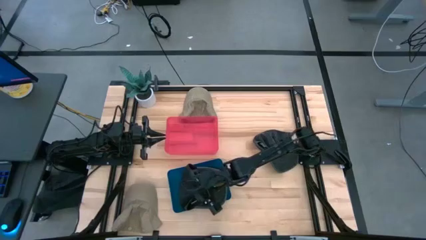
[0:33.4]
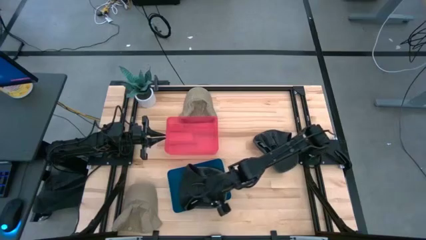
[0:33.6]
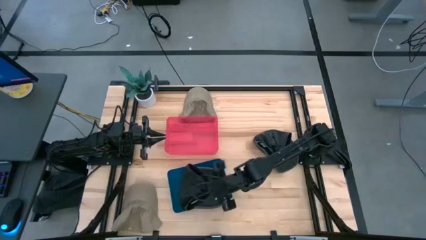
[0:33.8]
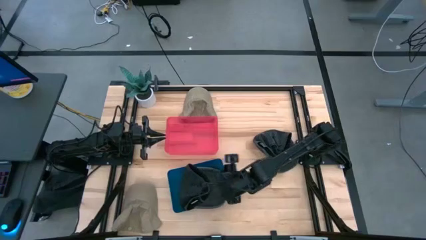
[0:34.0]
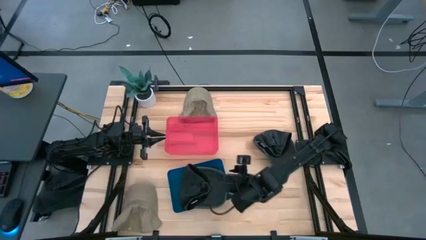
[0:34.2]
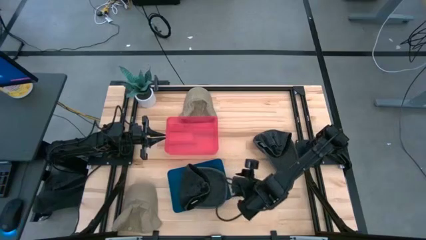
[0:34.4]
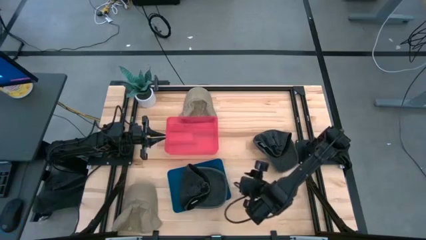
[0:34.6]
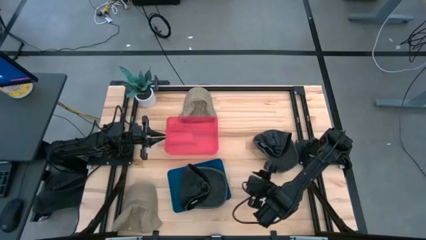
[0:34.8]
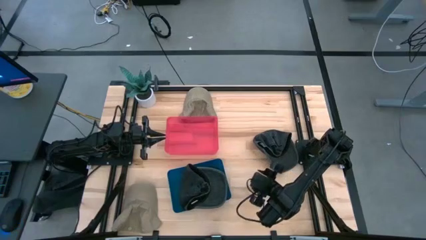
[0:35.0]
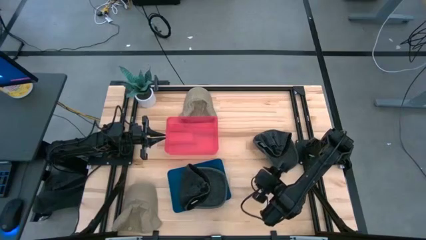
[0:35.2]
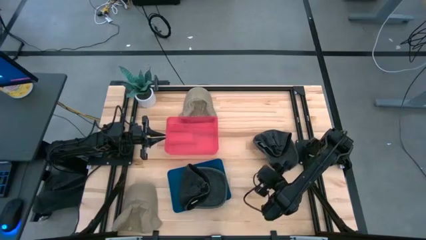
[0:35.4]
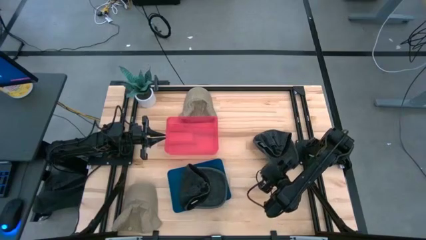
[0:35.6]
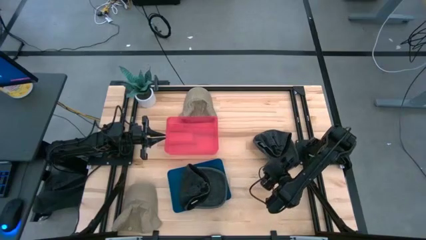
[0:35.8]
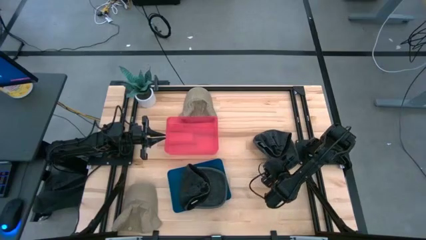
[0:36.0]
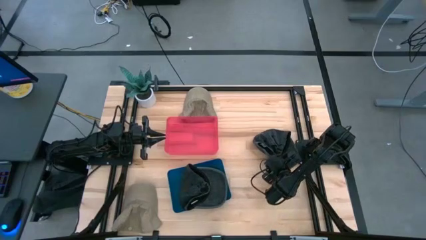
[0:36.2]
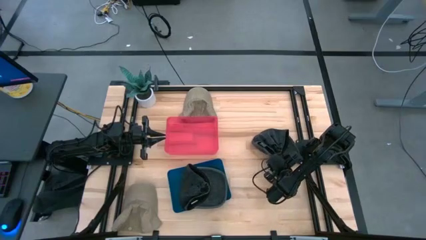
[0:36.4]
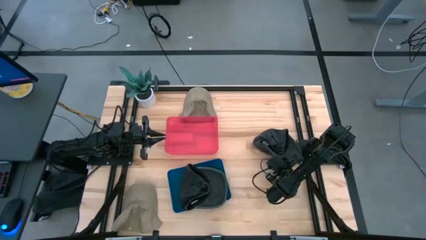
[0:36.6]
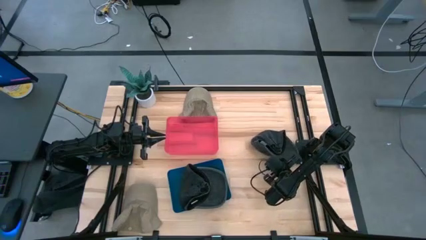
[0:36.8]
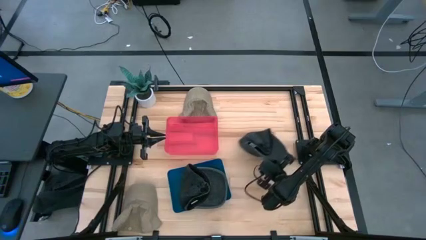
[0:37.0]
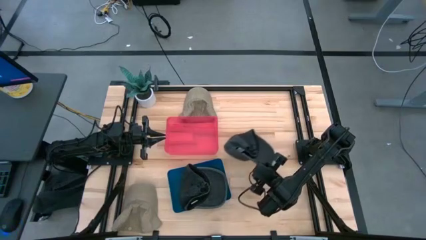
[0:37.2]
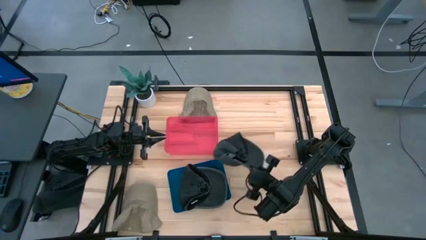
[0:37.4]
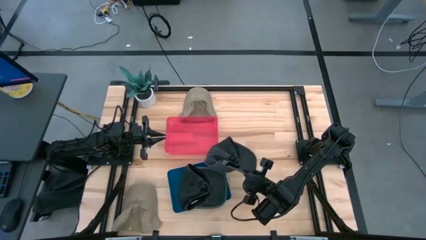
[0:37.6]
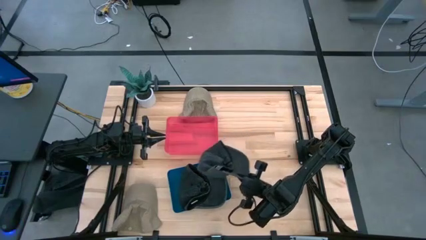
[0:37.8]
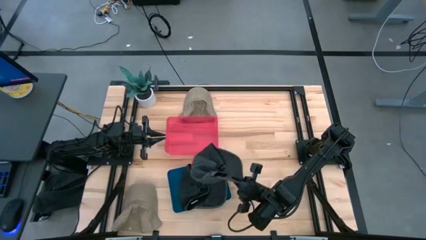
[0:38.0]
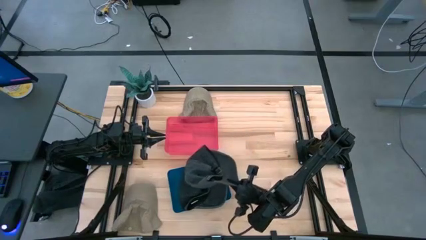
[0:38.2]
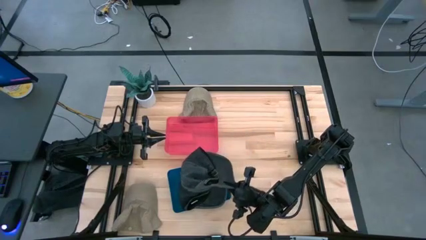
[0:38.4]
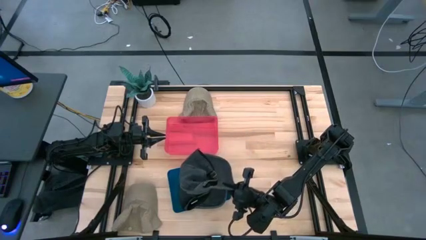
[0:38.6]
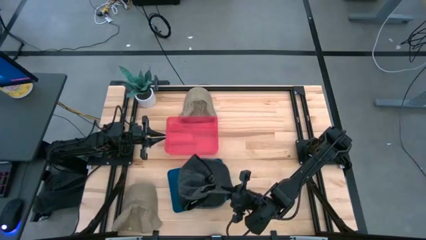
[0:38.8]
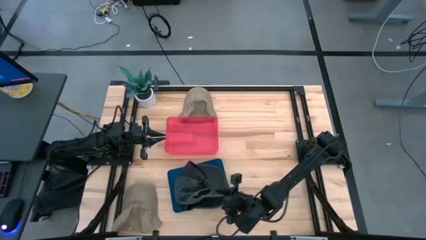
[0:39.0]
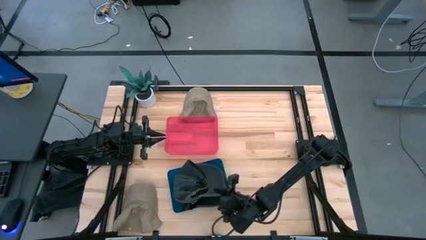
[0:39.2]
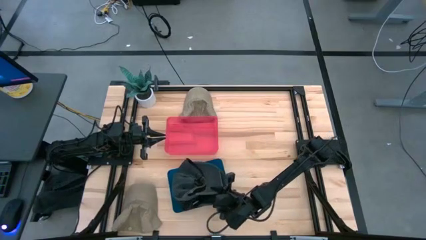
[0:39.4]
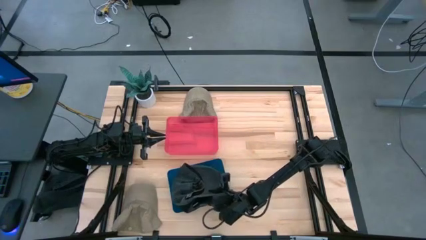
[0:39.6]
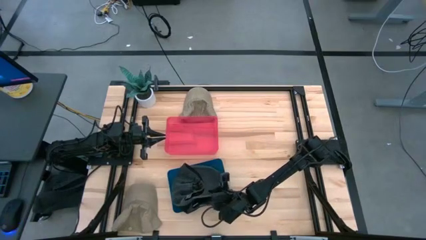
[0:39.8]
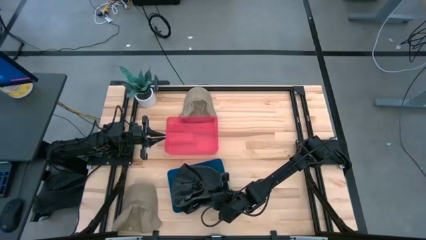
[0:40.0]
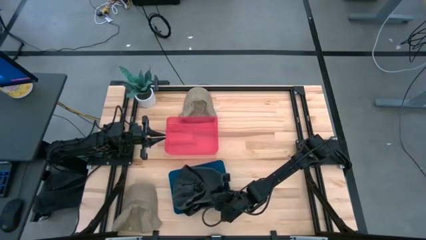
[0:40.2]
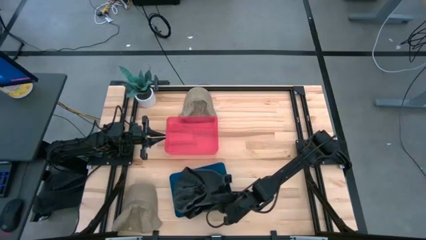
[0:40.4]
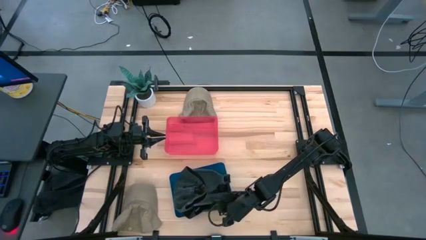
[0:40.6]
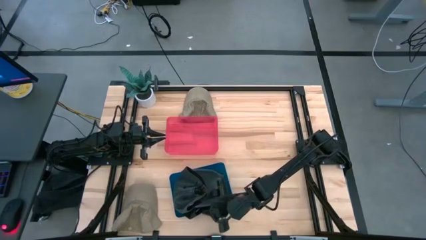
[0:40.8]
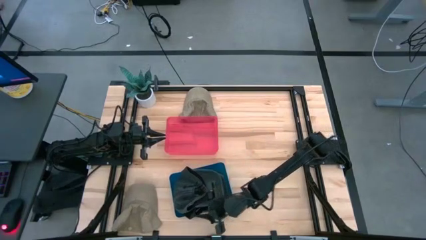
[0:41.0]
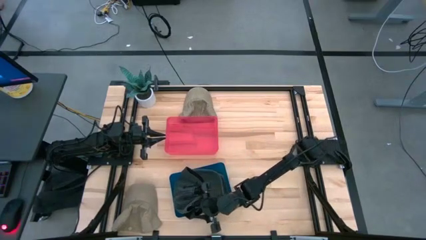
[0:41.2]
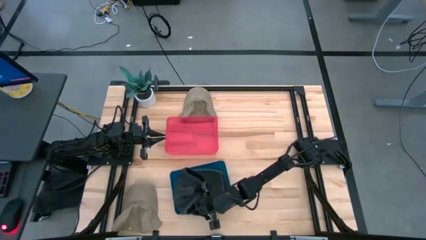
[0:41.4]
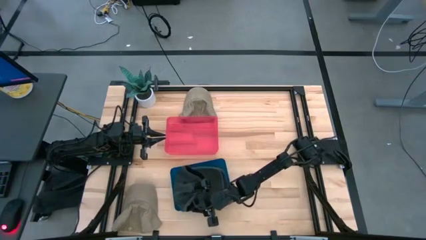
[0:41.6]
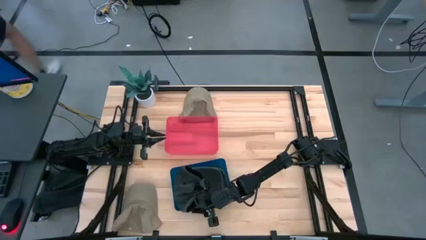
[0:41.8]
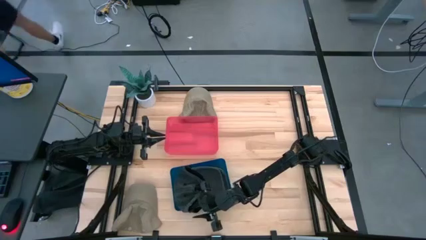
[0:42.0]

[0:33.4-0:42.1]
Task: Pick & Place hat
Put the black cap into the blue bin
